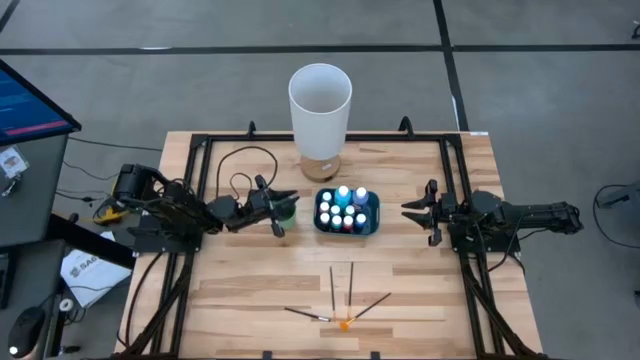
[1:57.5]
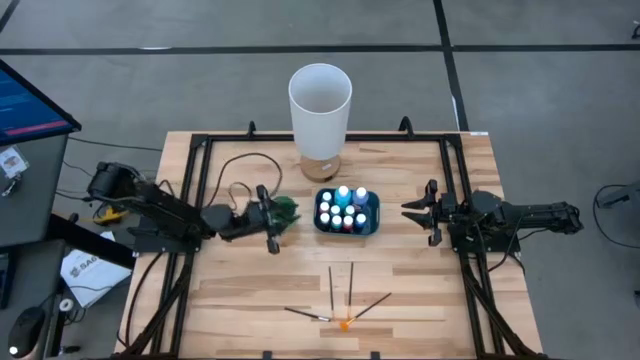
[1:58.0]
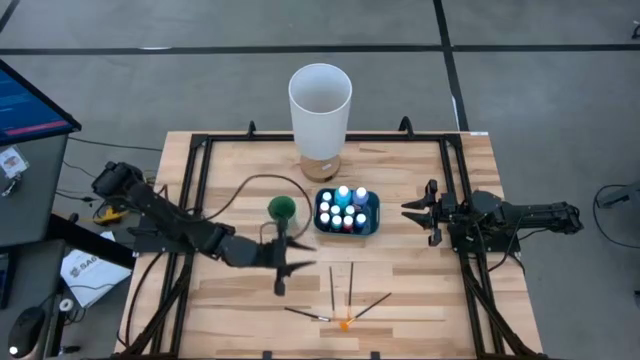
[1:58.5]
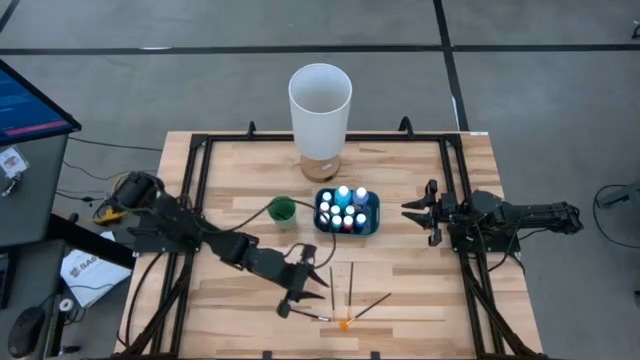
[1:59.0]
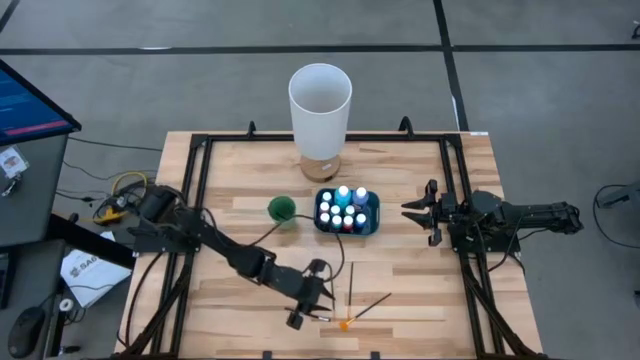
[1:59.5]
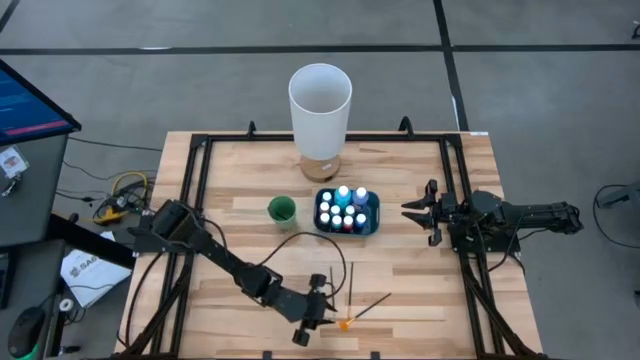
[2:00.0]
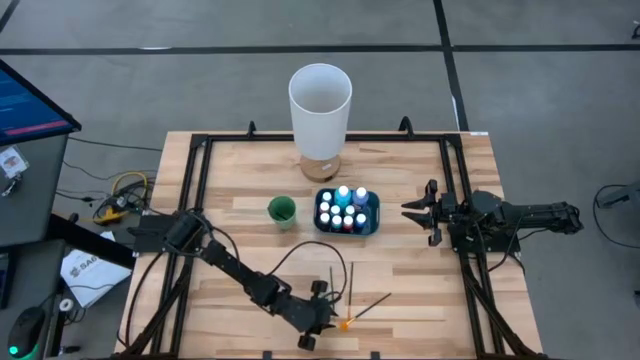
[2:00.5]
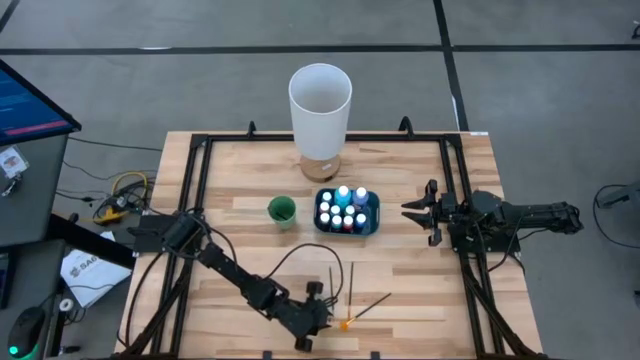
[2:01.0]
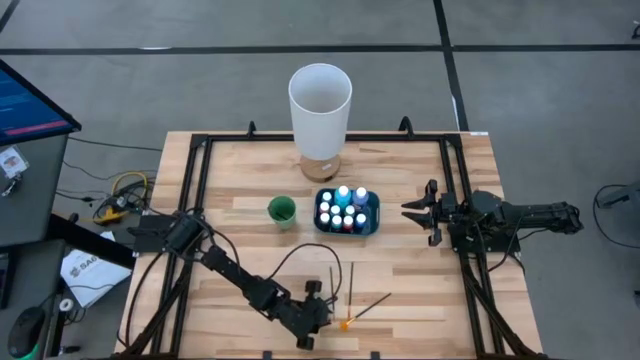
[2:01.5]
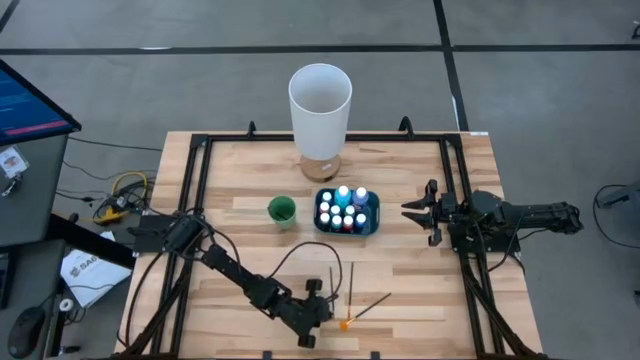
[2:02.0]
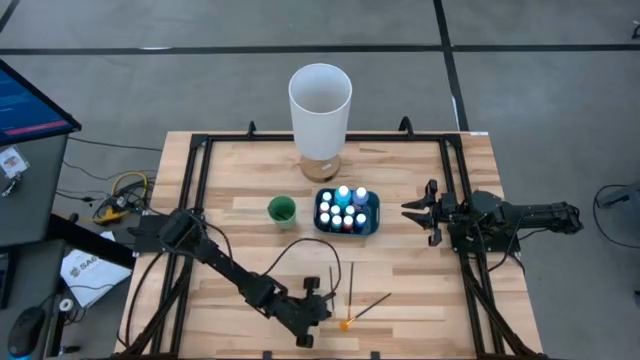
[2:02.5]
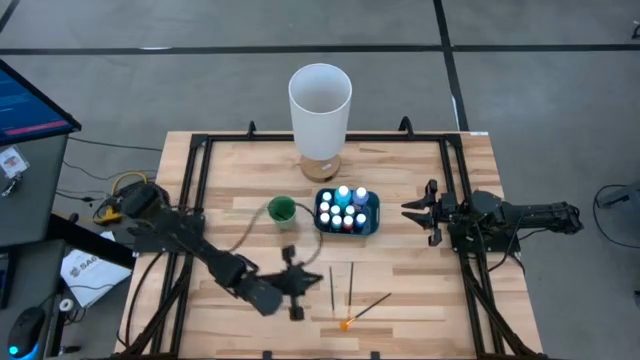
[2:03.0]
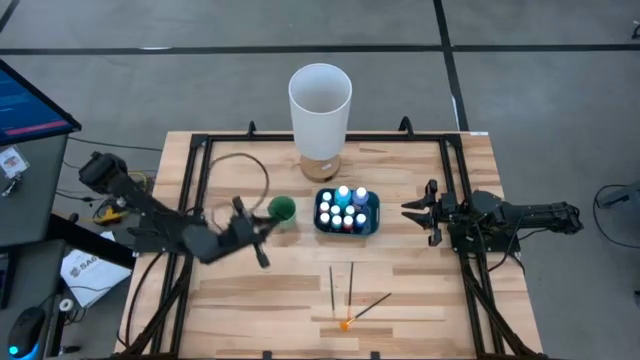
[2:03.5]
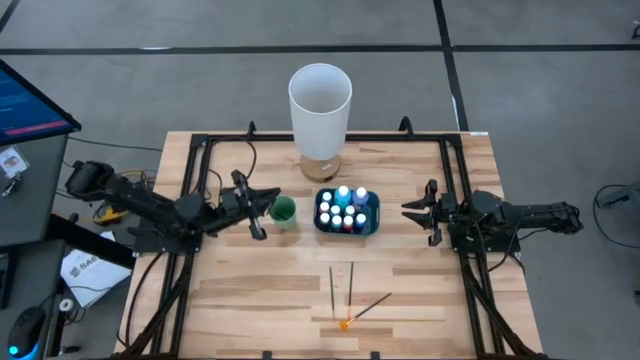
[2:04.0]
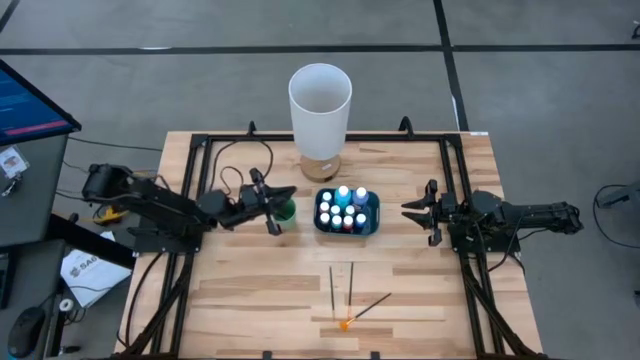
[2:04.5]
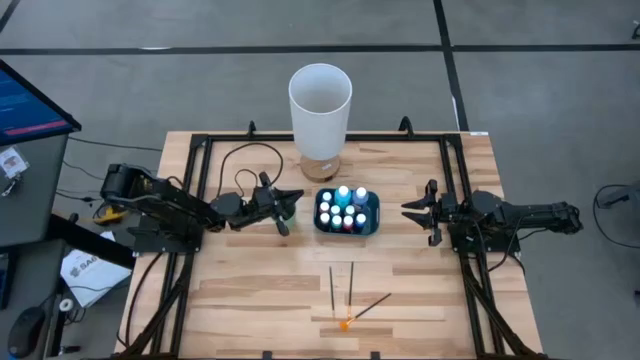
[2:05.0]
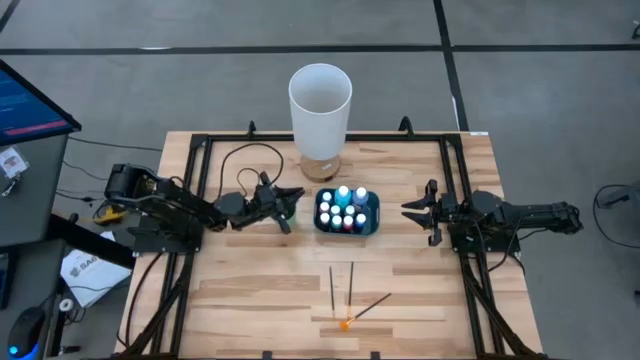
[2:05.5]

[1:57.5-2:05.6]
Task: Pick & Place Paint Supplies
Put the silver black paintbrush into the green cup

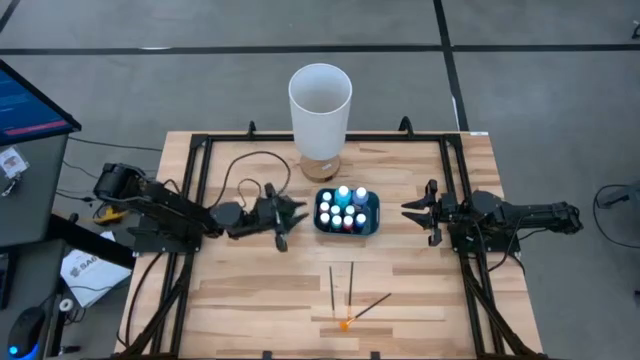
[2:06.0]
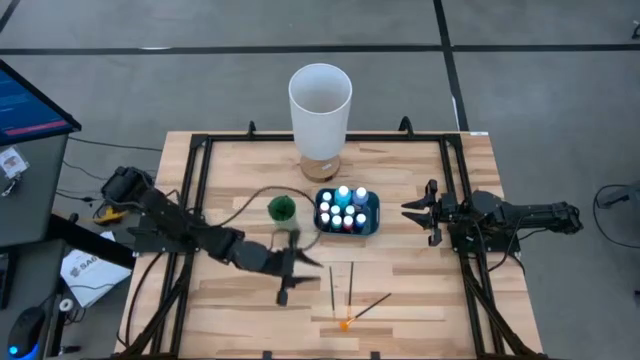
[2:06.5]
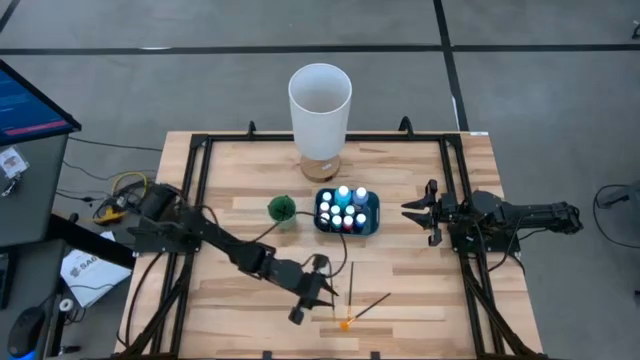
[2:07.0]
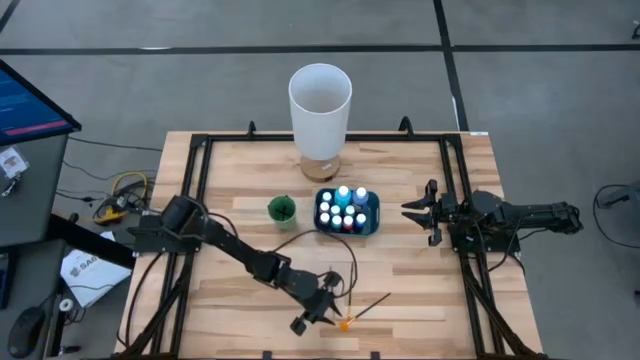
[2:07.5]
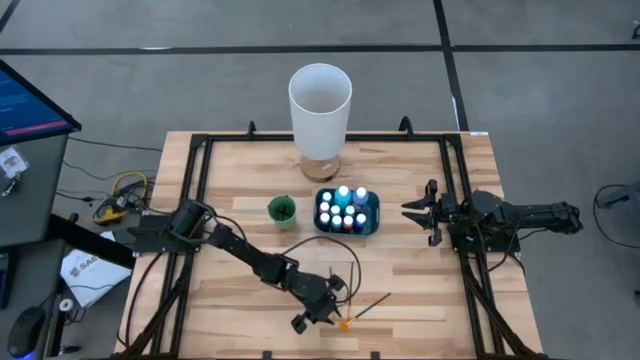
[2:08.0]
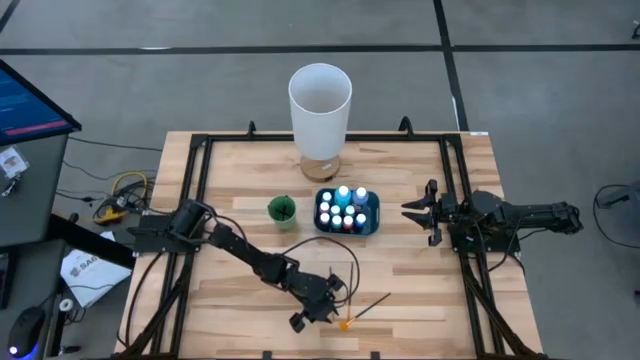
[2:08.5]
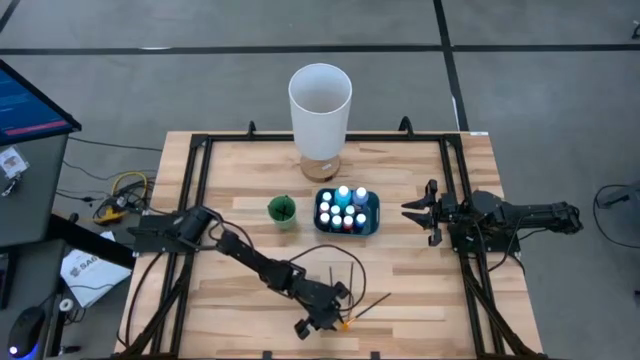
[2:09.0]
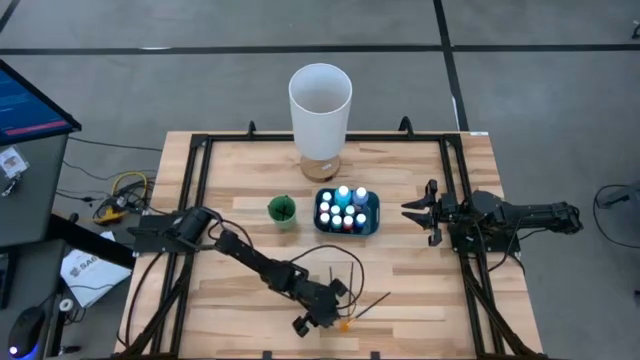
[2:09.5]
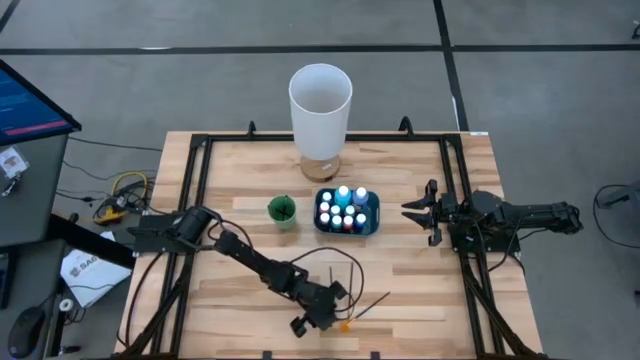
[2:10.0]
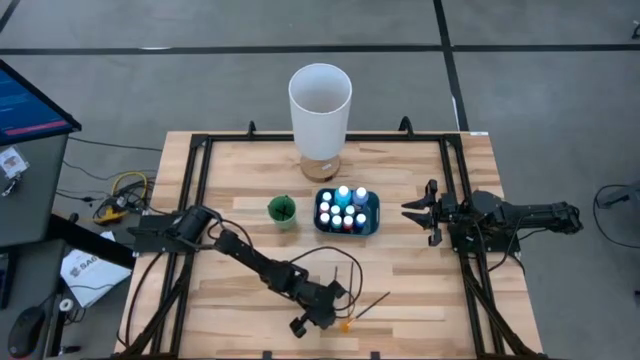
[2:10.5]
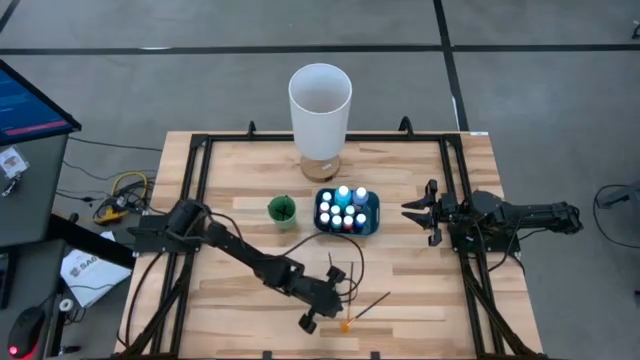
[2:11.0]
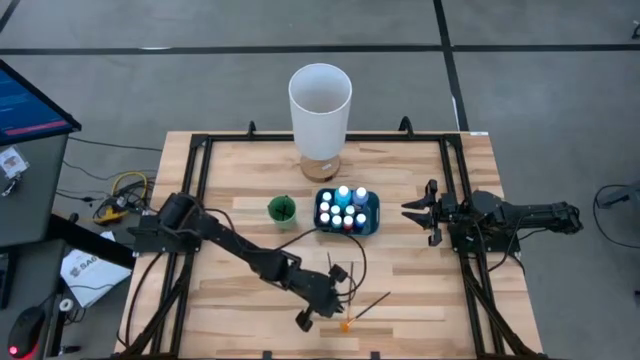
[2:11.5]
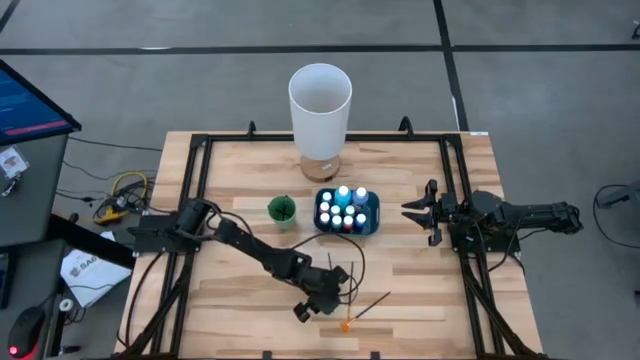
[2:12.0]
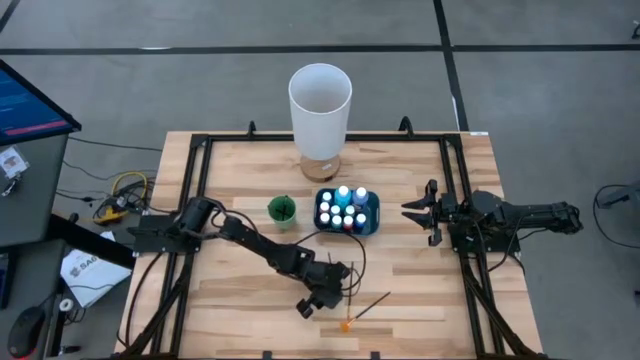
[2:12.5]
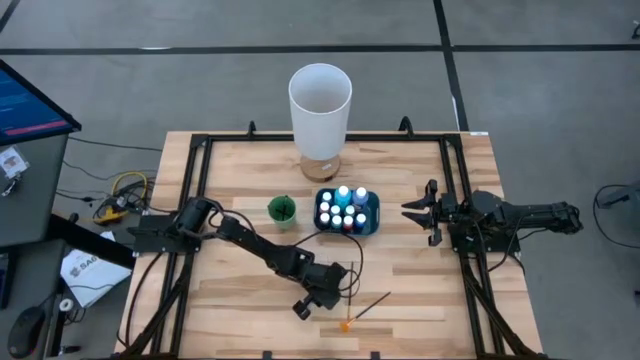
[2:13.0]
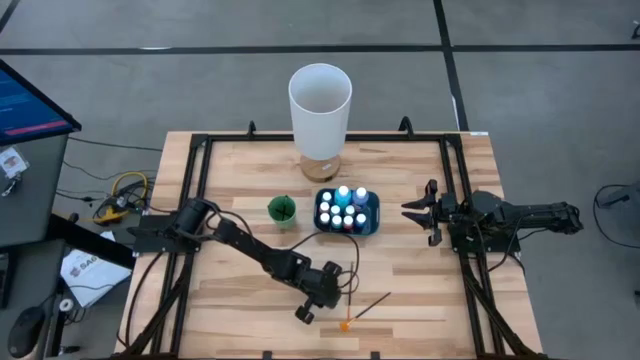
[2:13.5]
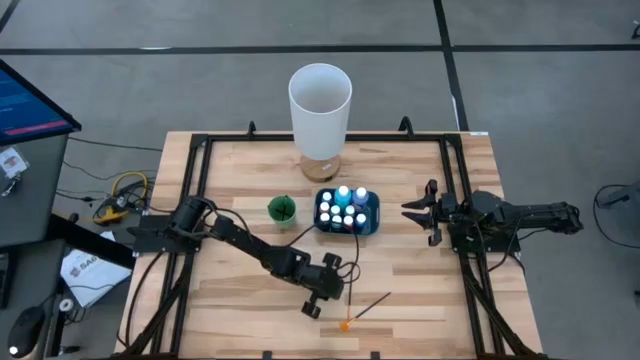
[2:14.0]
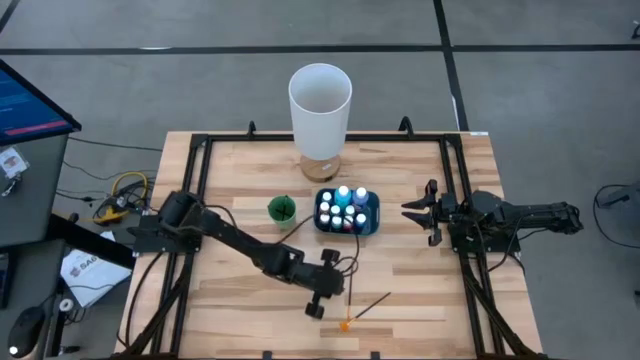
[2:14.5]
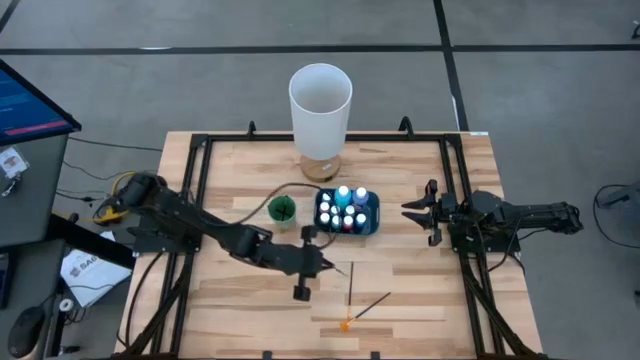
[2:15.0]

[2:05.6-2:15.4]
Put the left gold black paintbrush into the green cup

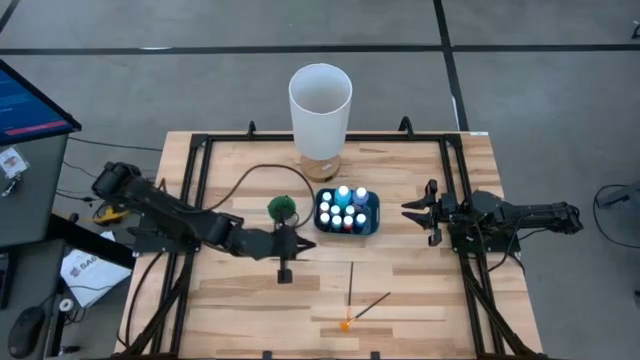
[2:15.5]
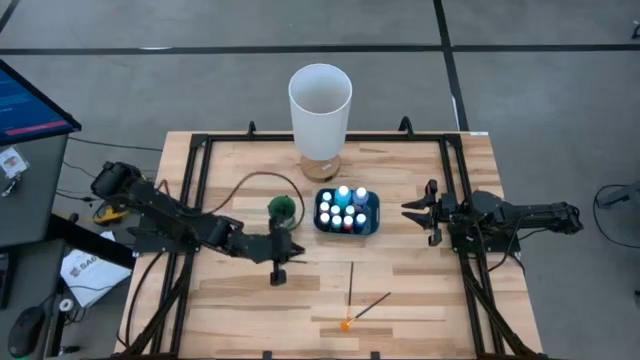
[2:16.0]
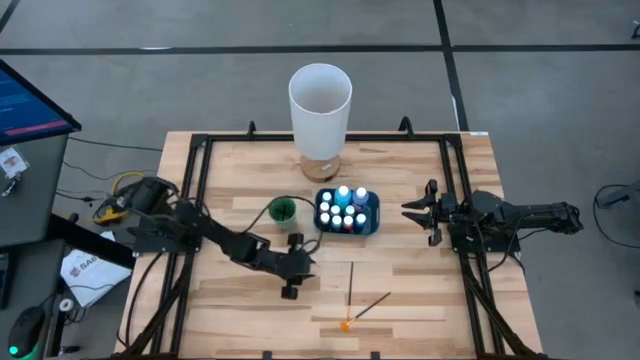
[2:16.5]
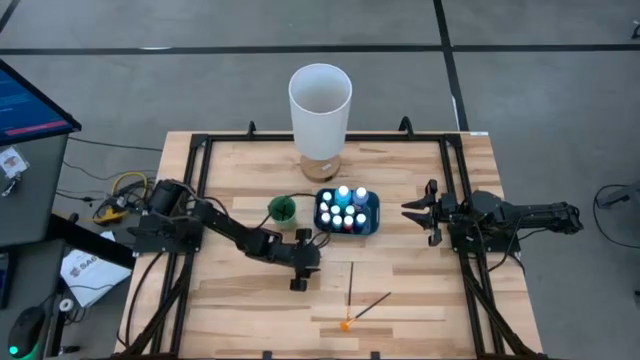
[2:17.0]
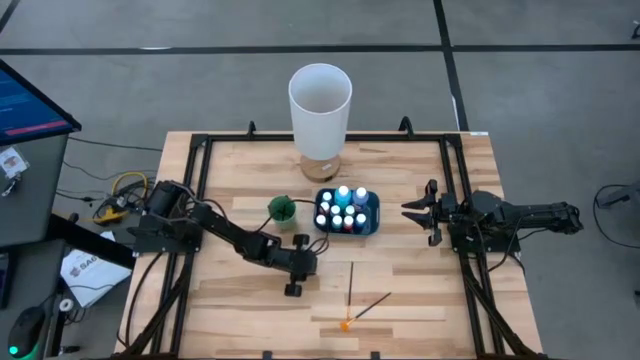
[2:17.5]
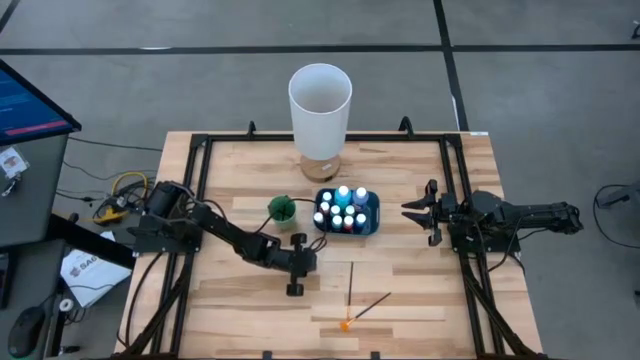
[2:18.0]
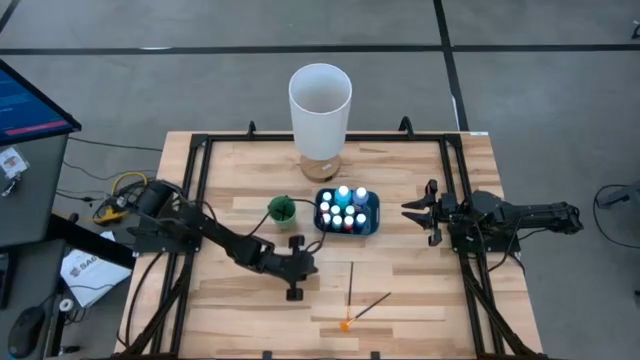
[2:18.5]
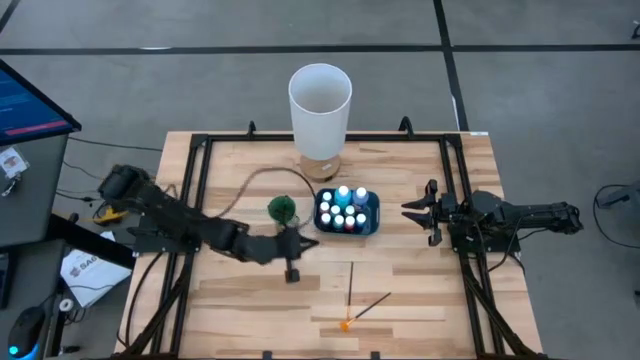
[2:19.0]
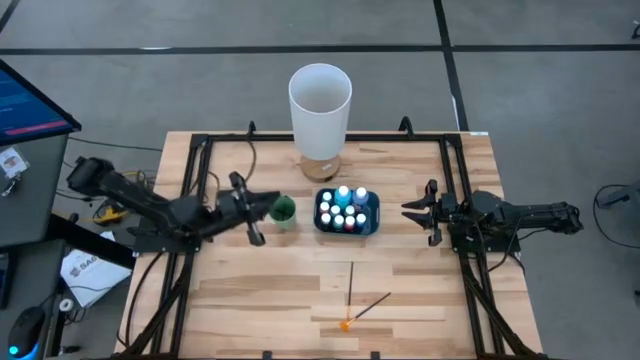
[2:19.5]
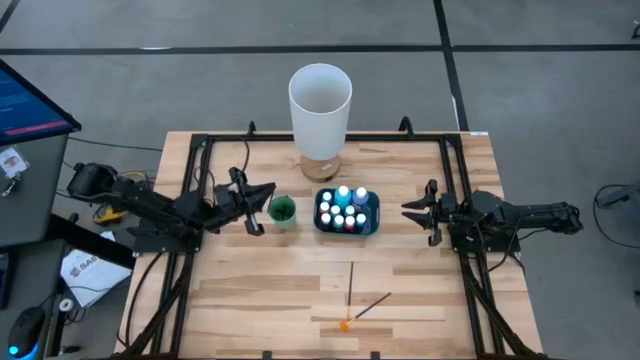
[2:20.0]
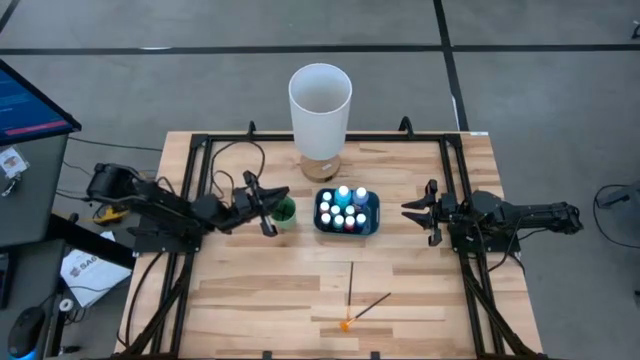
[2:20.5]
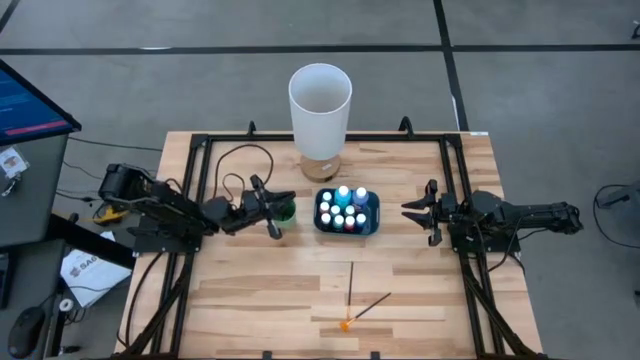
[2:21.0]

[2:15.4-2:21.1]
Put the left gold paintbrush into the green cup
